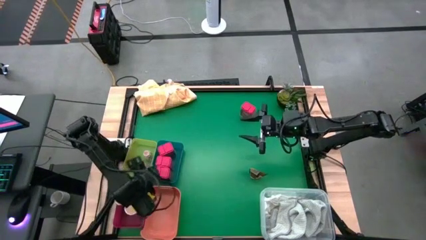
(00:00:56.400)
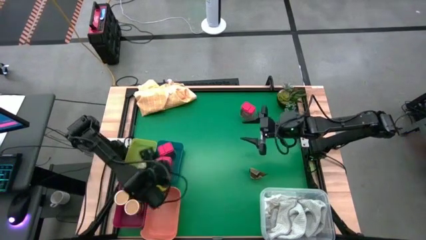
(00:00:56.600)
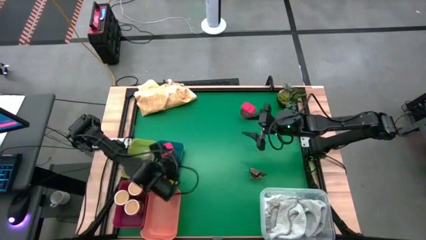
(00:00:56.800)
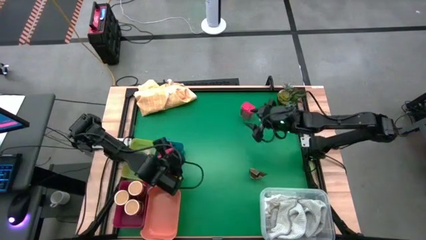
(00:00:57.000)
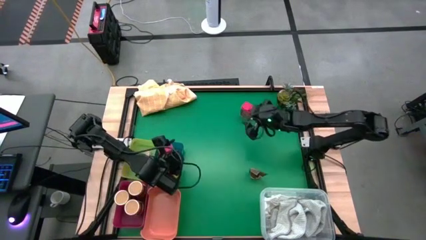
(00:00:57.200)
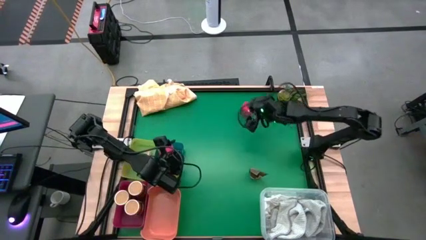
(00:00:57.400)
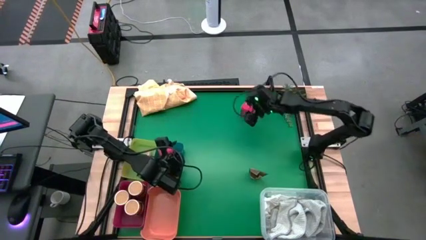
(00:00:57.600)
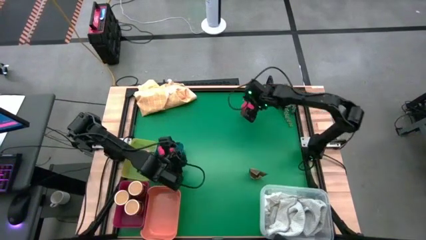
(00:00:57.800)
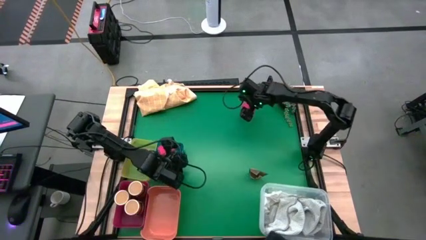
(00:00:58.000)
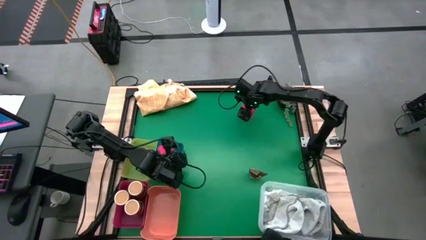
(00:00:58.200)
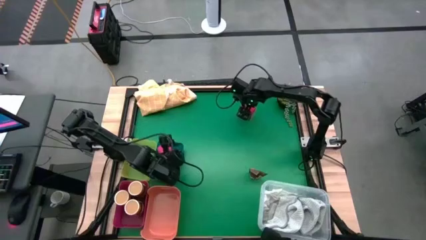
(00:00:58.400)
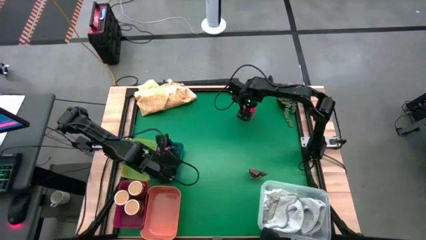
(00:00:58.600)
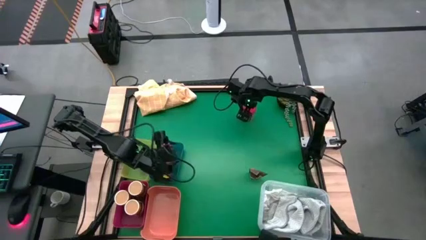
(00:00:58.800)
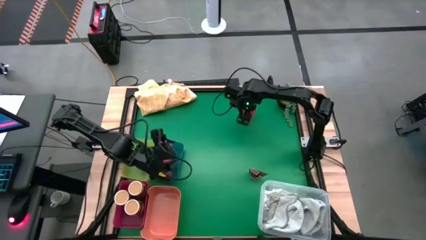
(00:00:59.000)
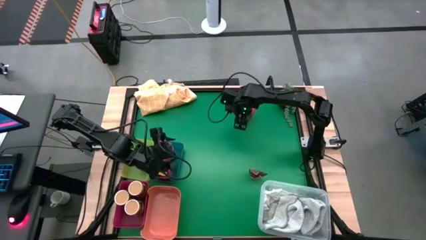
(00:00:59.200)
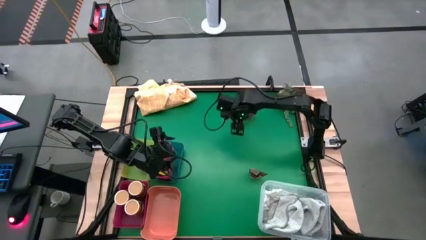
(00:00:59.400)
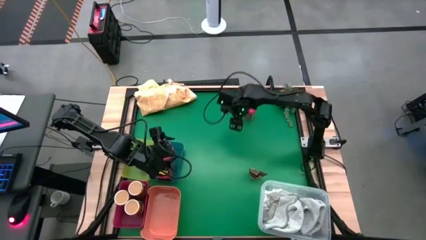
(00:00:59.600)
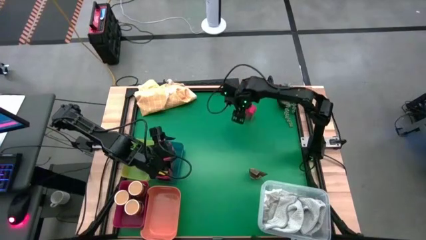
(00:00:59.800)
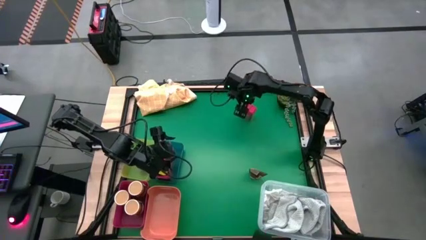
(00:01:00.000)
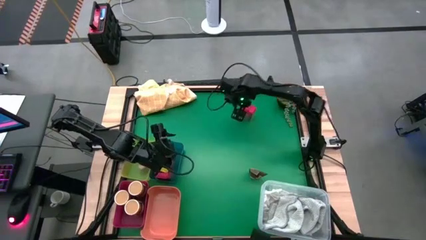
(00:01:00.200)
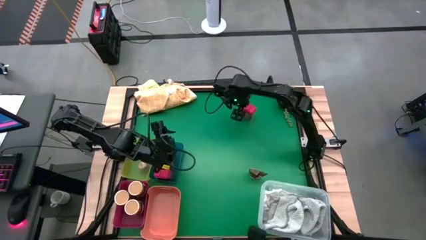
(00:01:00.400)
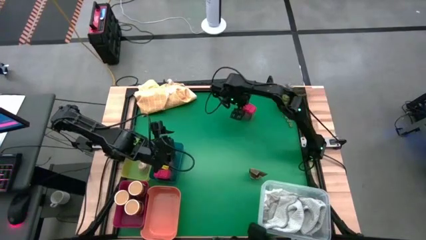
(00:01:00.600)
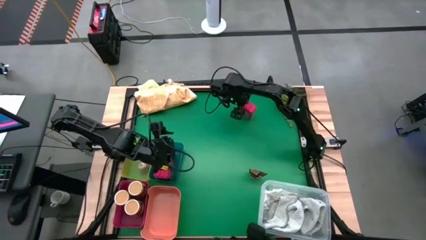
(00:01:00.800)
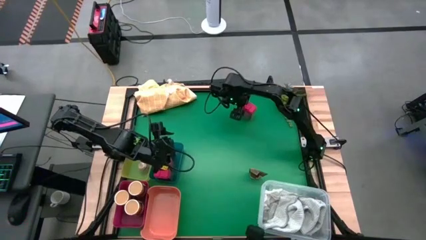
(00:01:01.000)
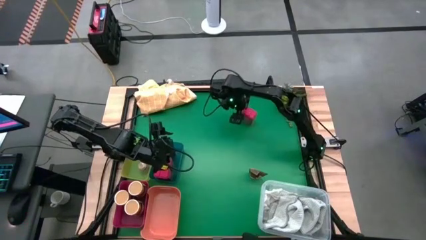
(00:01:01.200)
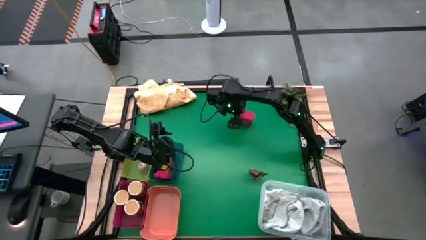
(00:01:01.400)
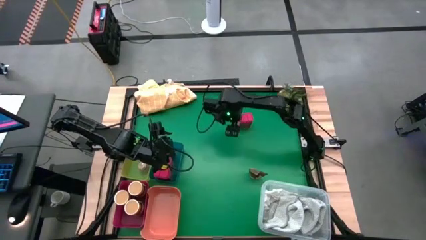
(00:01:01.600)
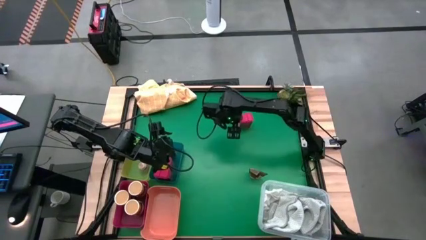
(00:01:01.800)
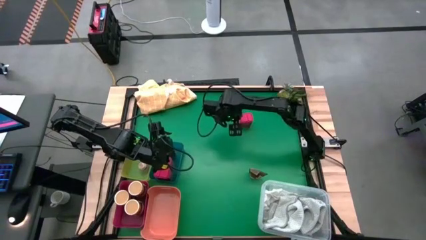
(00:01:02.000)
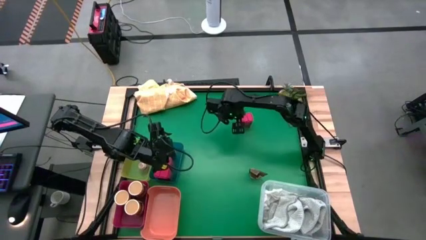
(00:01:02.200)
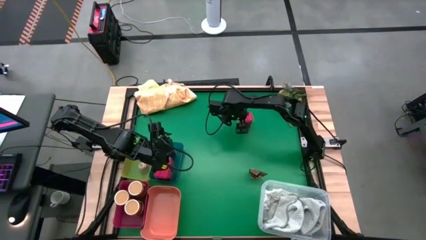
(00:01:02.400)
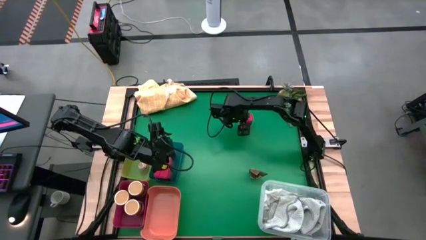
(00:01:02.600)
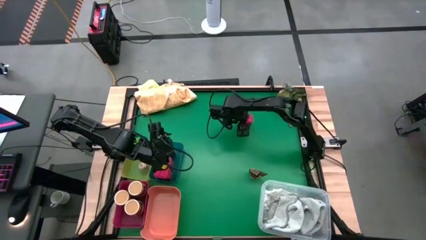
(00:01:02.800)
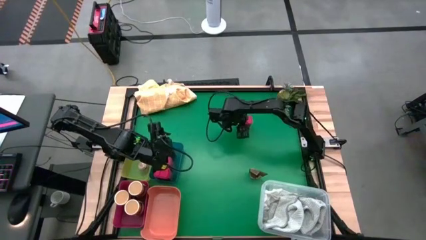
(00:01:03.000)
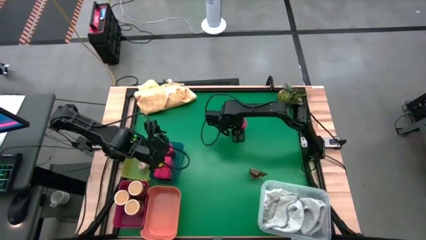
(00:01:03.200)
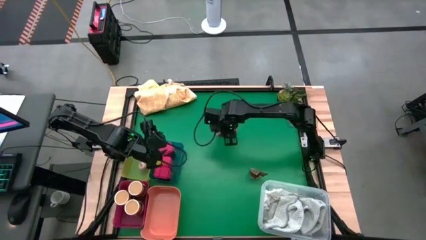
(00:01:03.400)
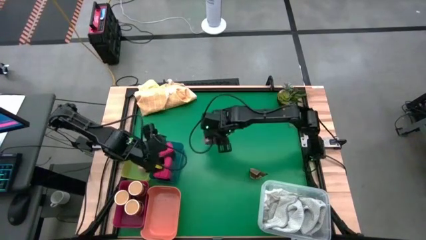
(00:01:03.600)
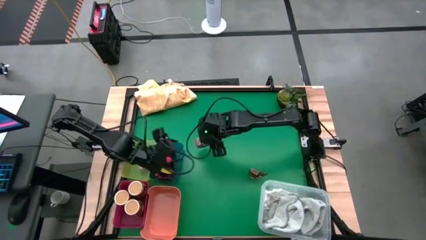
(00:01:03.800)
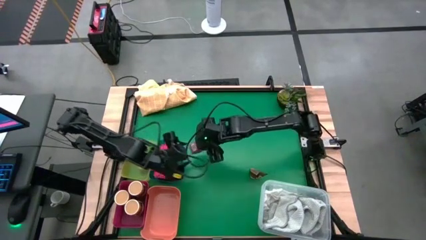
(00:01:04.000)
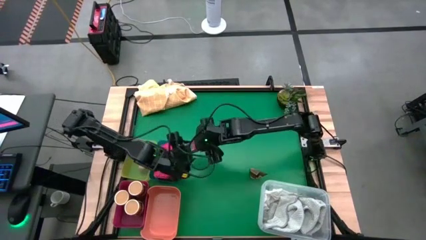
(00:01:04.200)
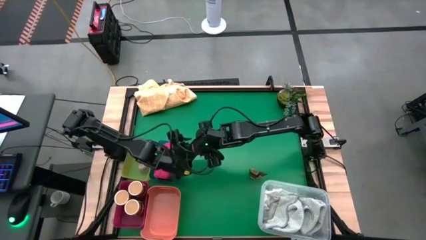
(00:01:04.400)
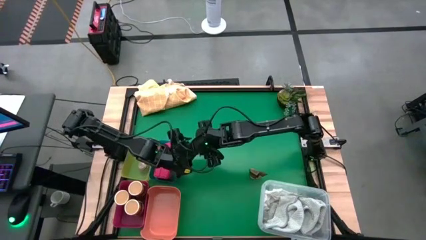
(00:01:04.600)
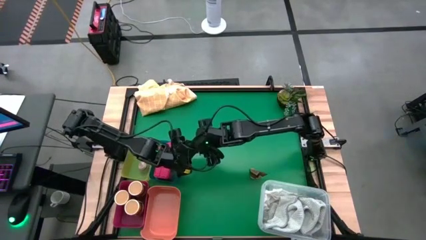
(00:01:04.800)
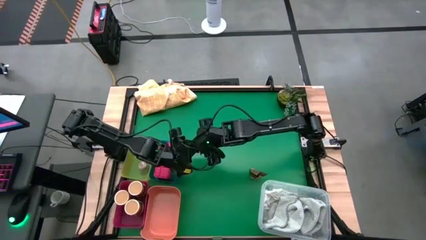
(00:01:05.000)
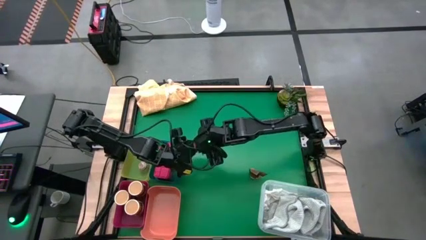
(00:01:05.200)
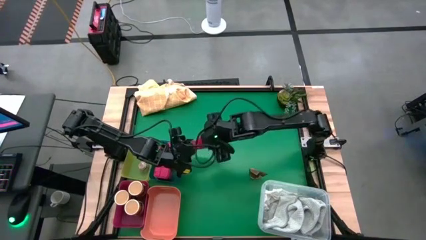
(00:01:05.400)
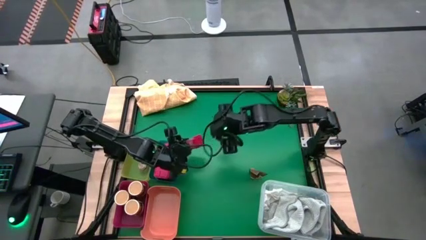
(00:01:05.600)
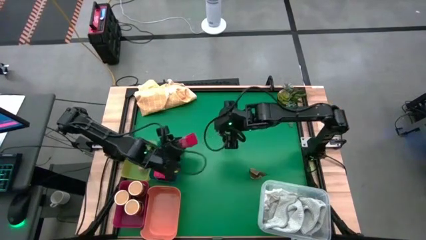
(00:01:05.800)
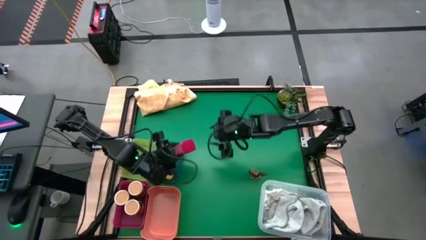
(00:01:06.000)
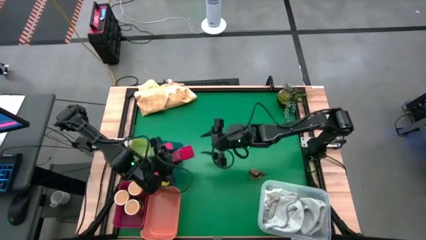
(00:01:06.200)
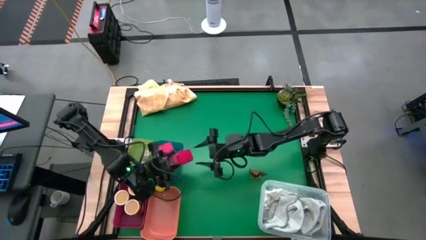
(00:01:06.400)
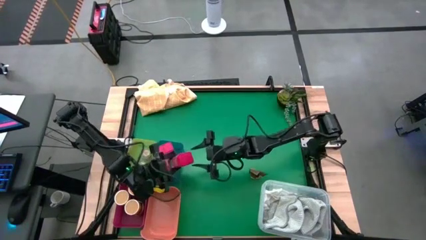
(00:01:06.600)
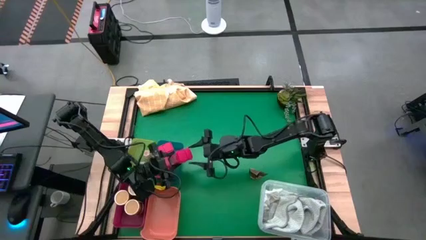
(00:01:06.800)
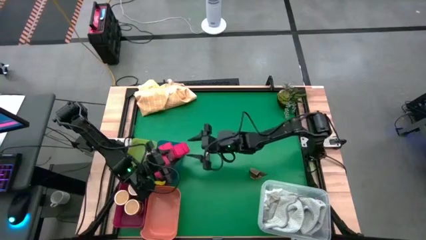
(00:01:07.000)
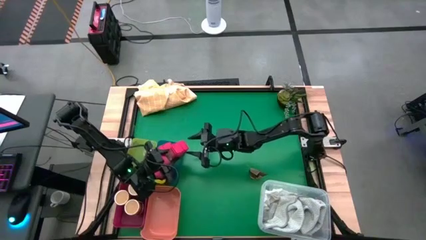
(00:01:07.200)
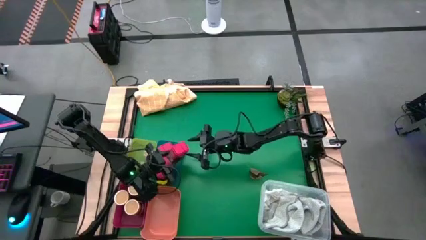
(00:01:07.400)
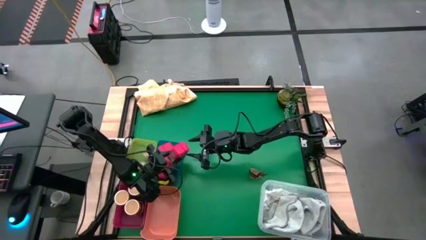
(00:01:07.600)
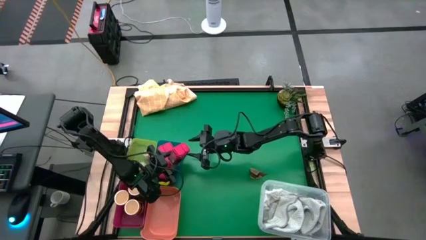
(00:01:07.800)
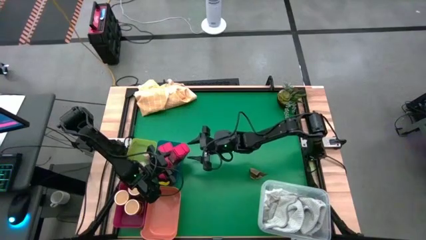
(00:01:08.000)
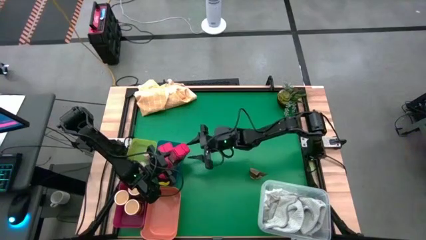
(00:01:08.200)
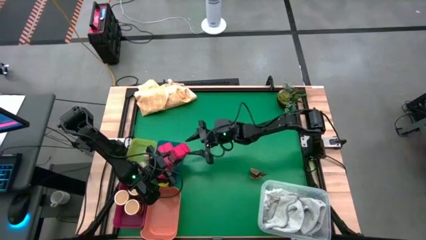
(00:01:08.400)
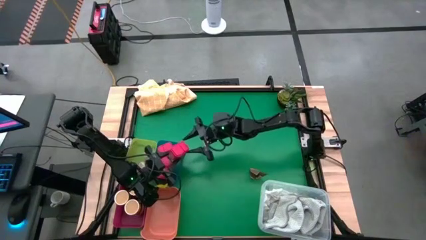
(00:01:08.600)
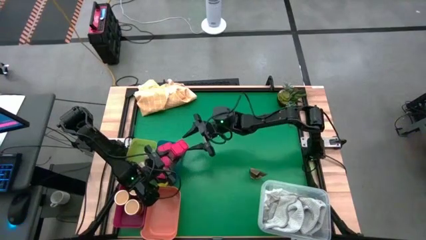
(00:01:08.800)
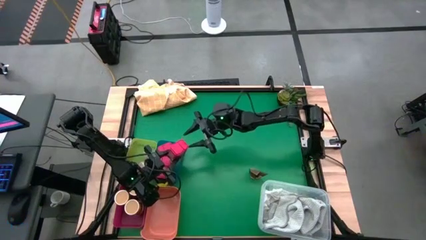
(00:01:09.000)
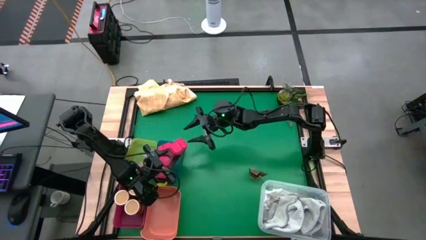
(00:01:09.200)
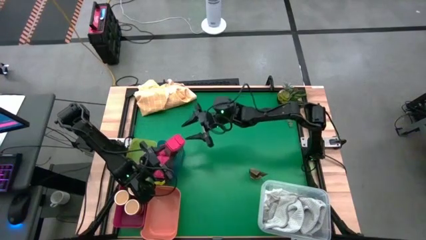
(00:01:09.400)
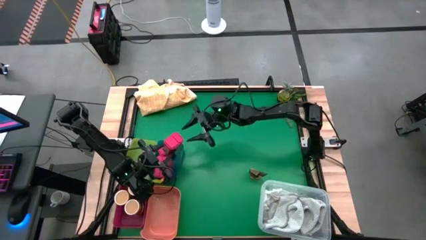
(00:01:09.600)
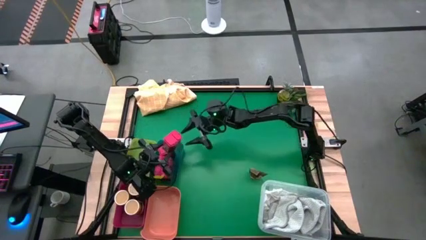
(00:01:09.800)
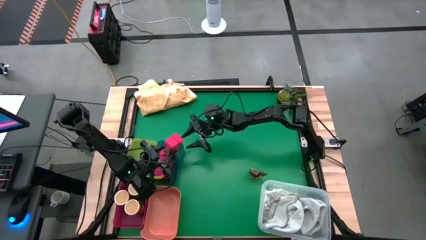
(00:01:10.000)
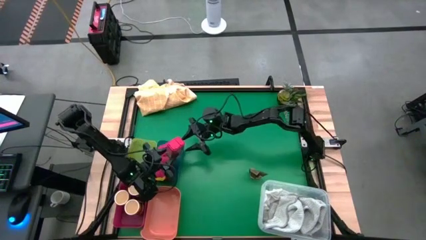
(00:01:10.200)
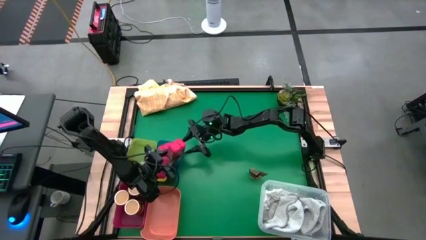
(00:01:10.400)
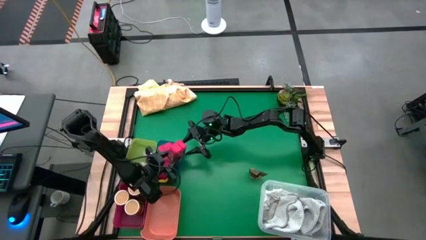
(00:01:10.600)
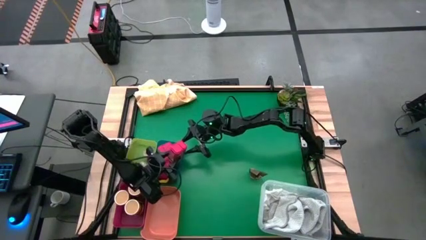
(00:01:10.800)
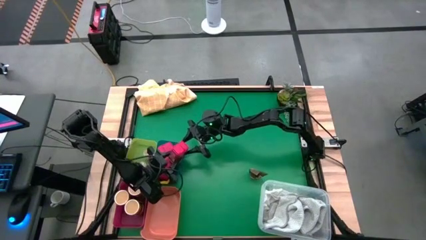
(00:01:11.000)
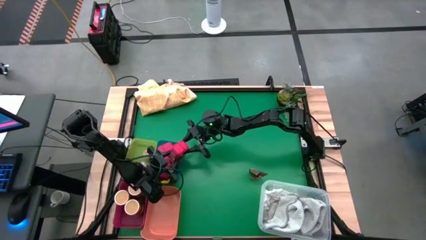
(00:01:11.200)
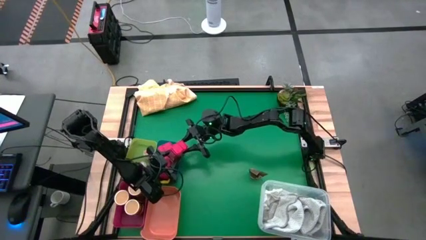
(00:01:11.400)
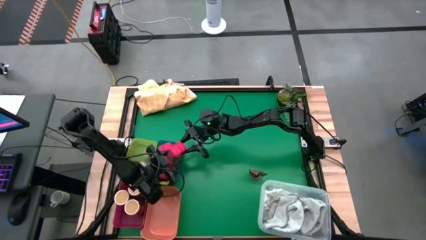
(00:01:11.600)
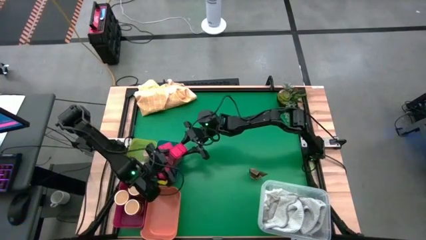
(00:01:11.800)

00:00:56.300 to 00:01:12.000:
Task: Sort spices by type
Put the red seasoning can into the blue bin
